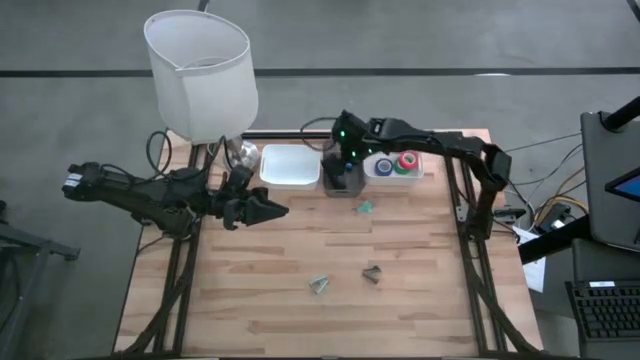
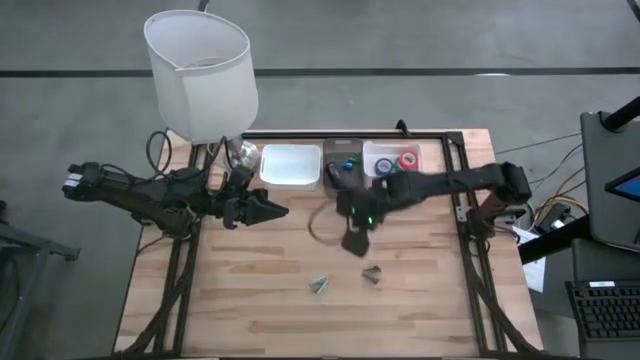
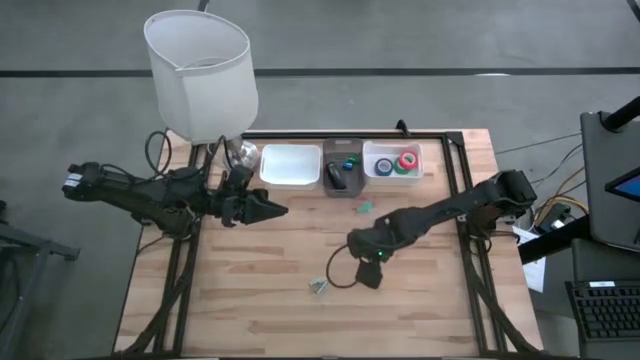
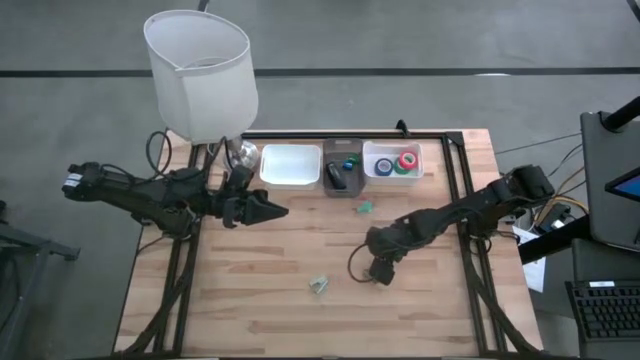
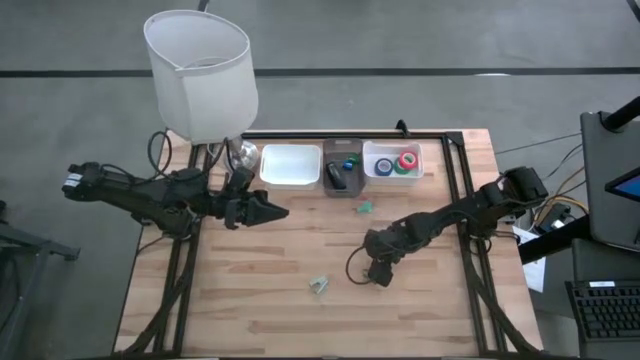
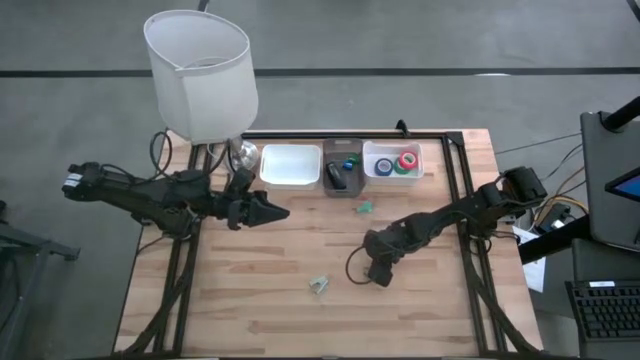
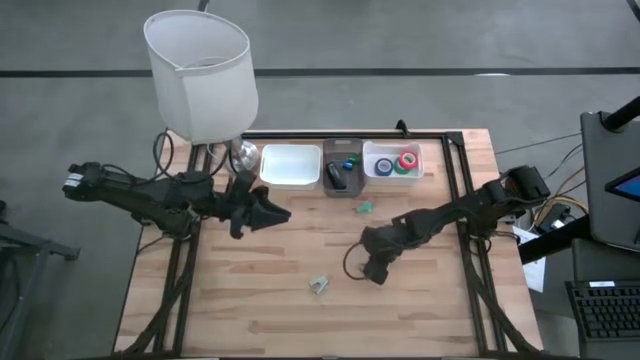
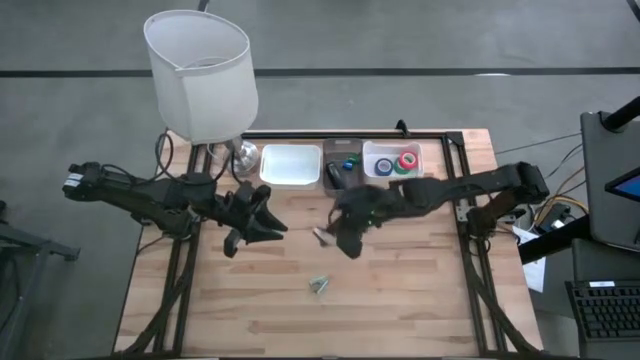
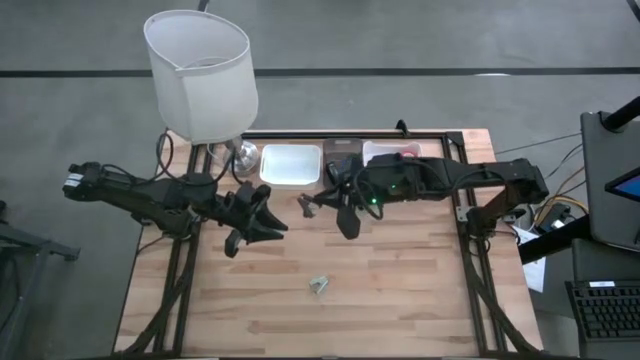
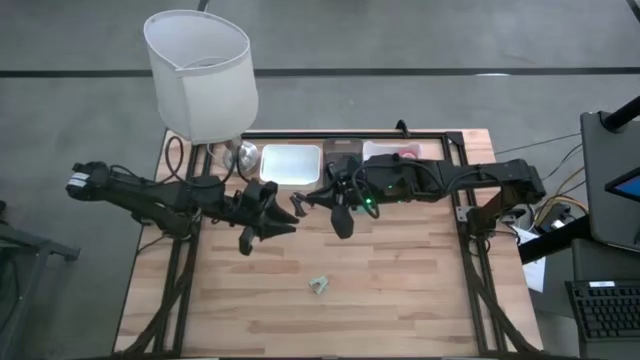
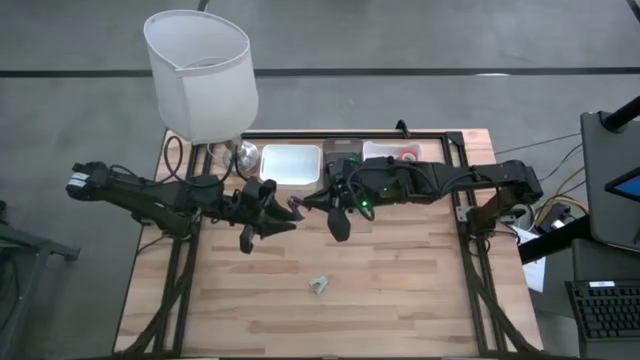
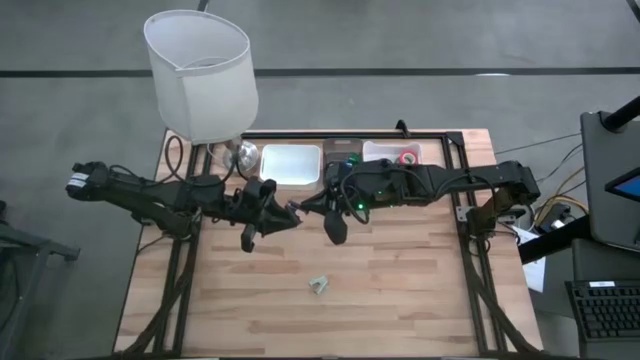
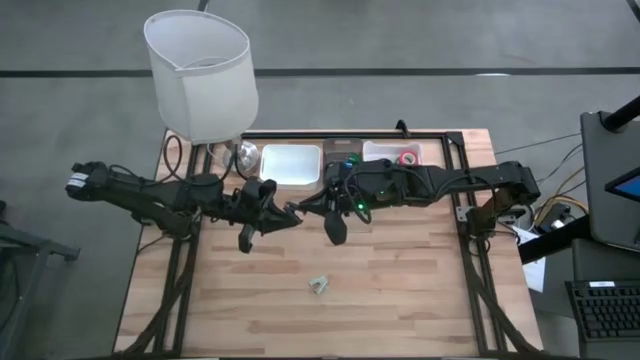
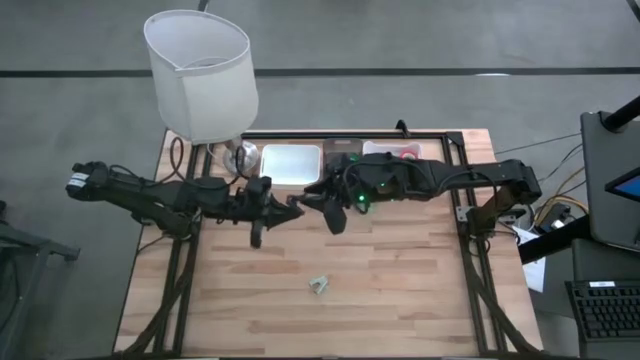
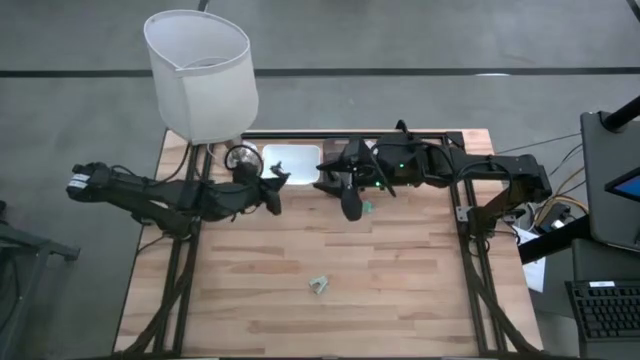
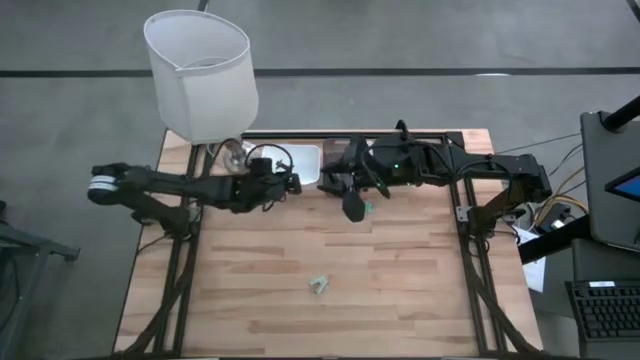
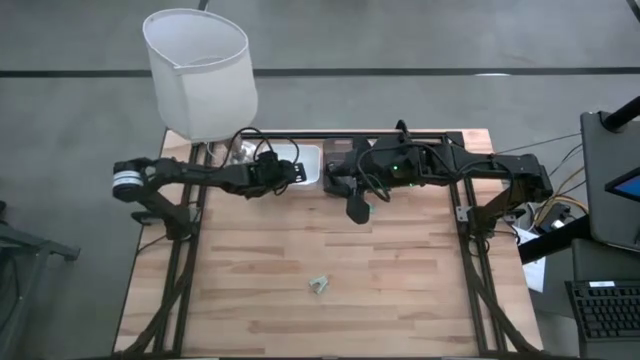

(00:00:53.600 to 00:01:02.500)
Task: Pick and place Stapler, Stapler remover, tape
Put the black staple remover into the left white bin

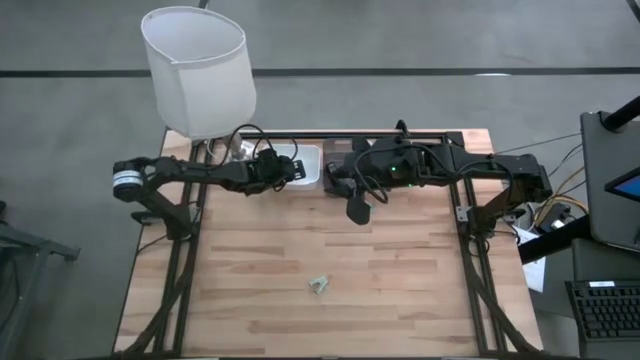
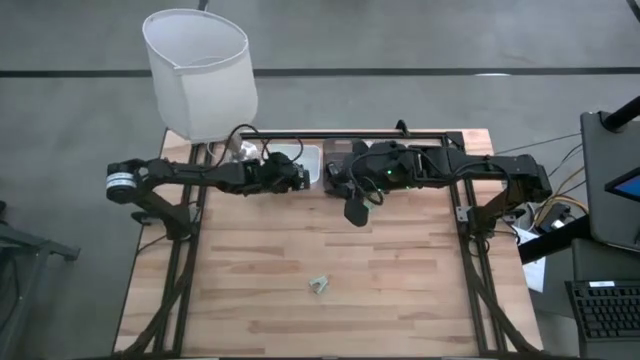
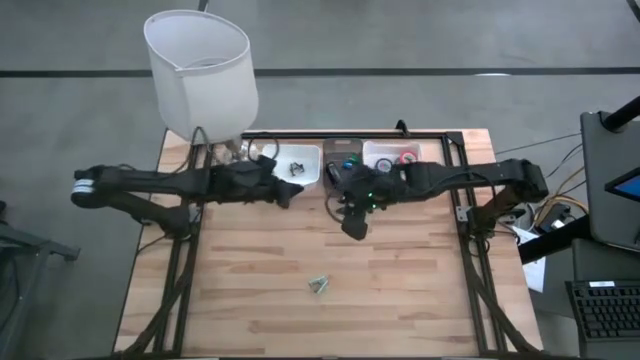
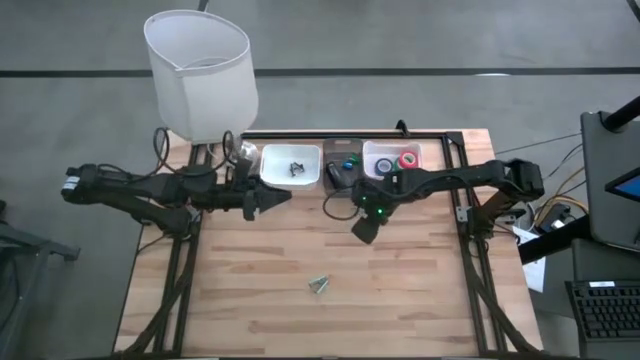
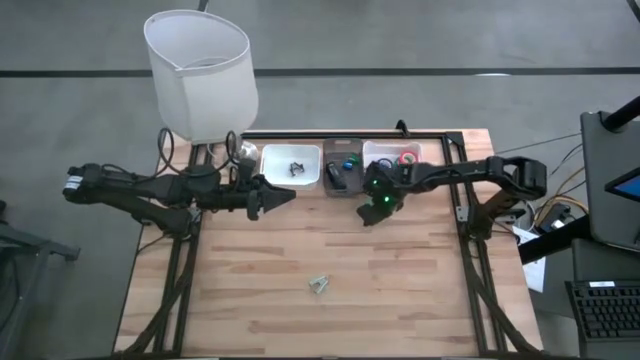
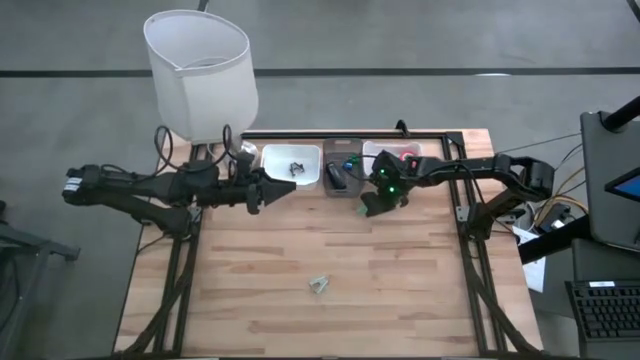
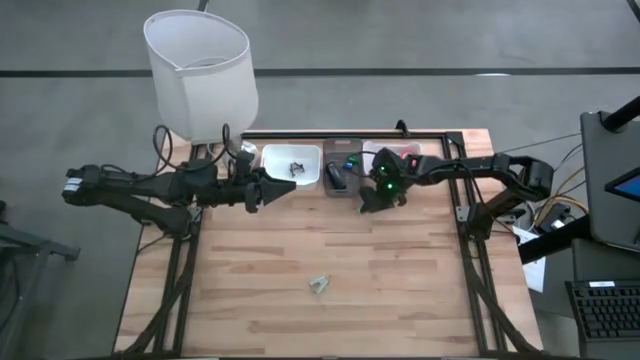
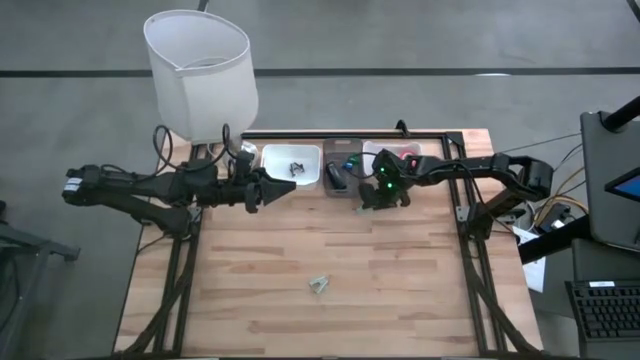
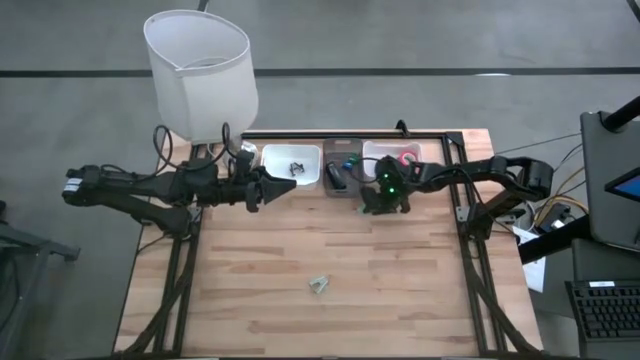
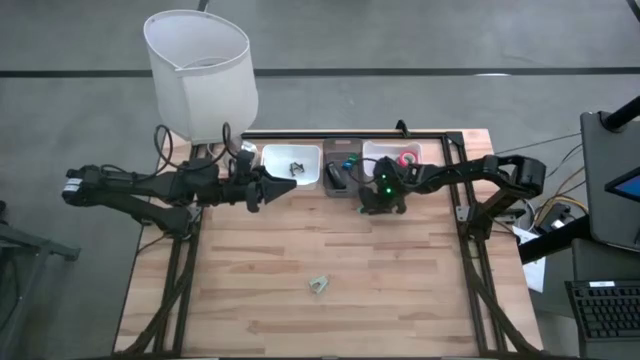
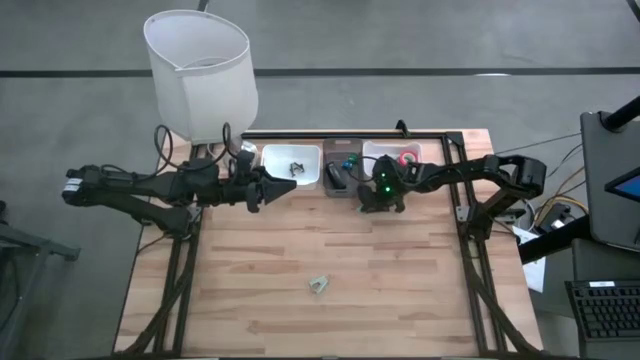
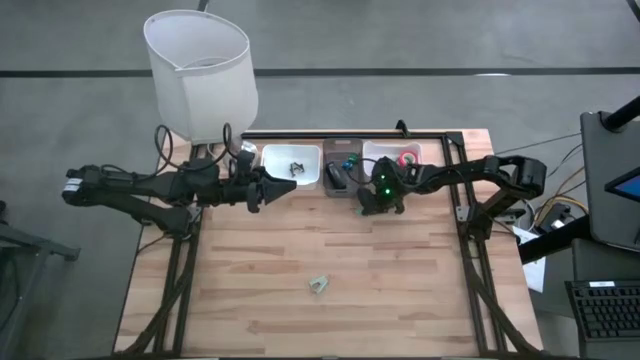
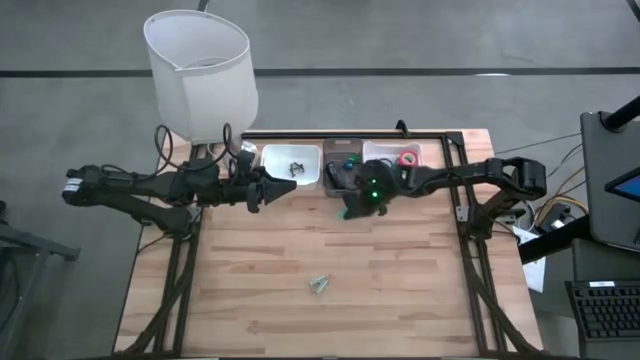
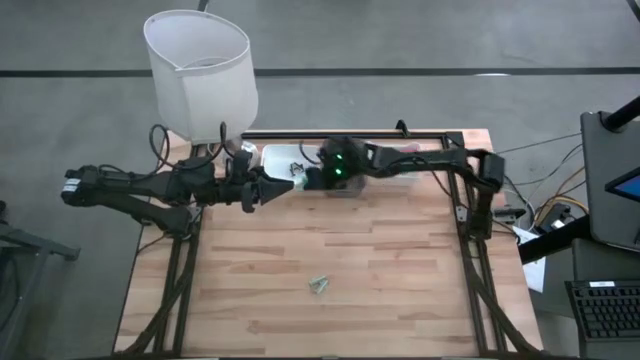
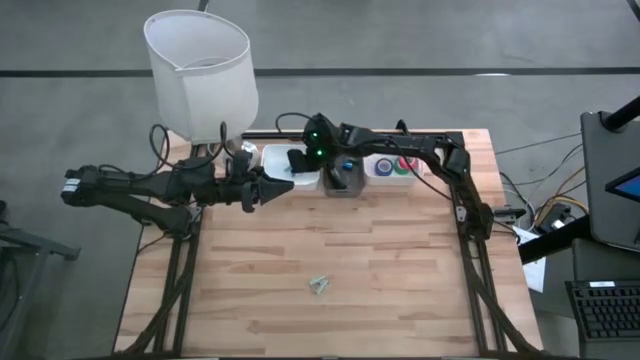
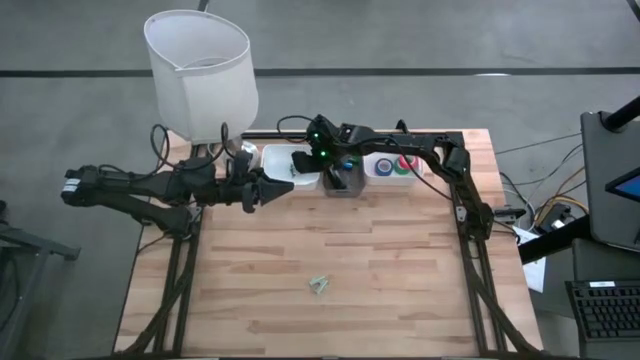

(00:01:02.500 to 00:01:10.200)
Put the top light blue staple remover into the left white bin

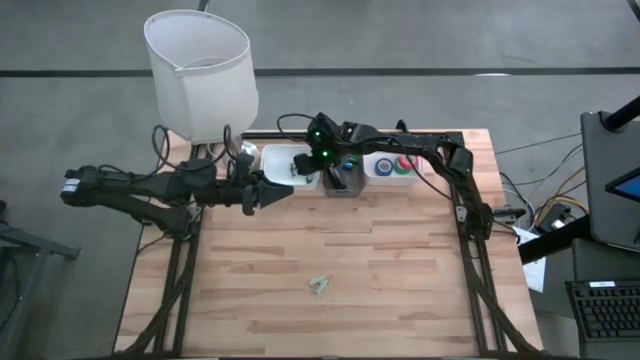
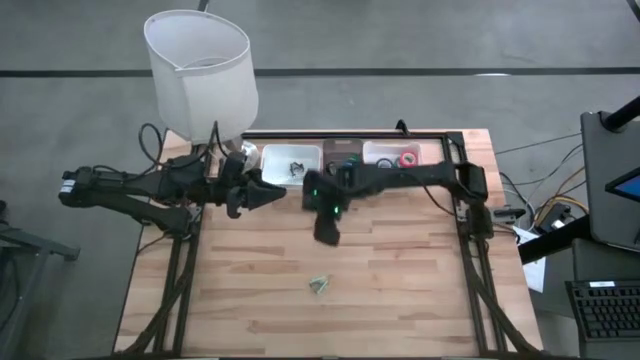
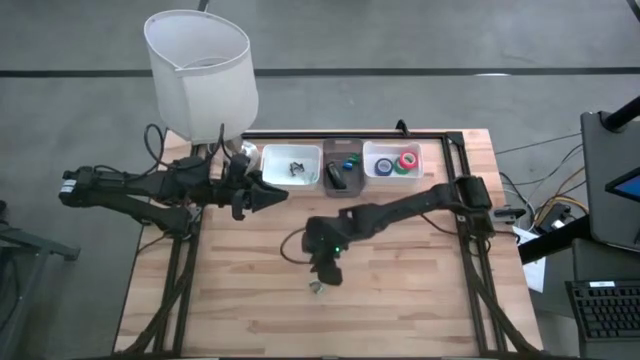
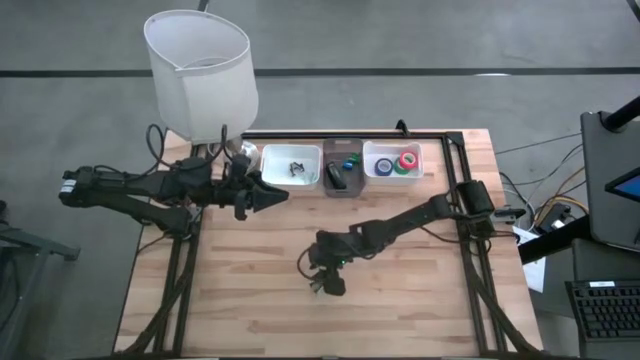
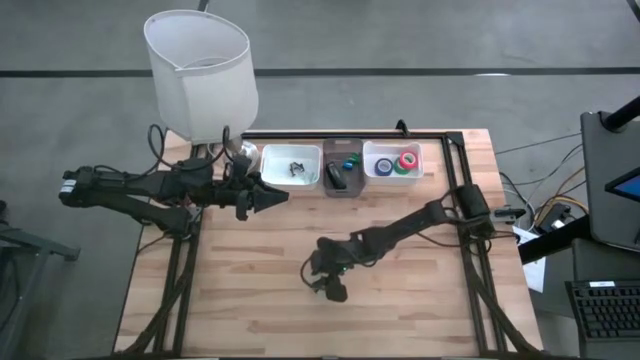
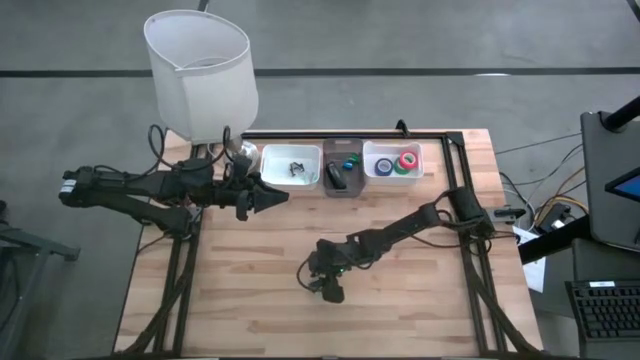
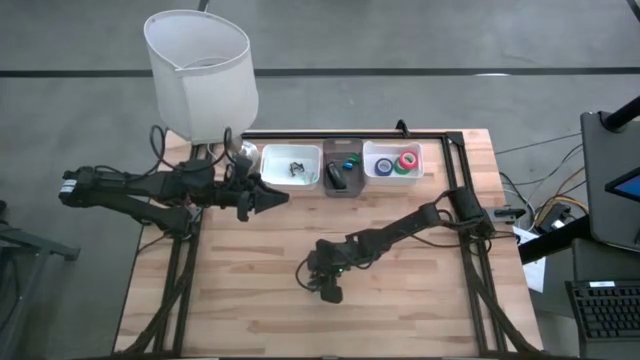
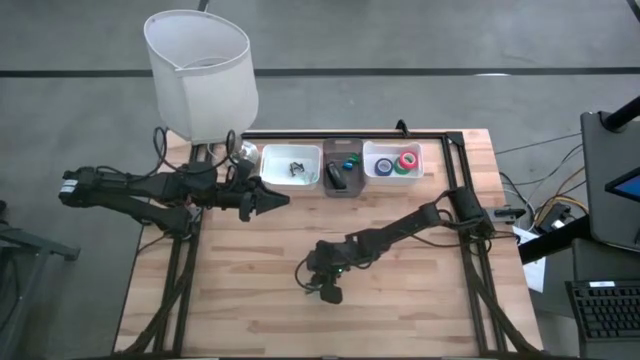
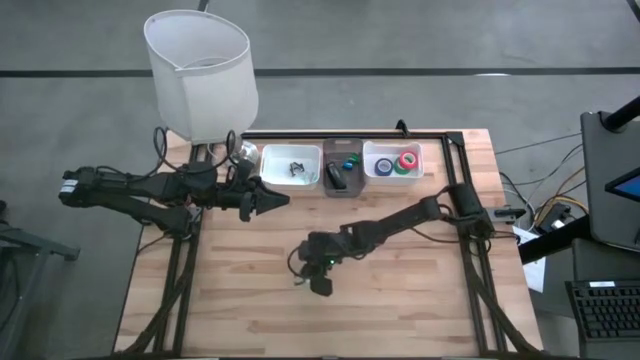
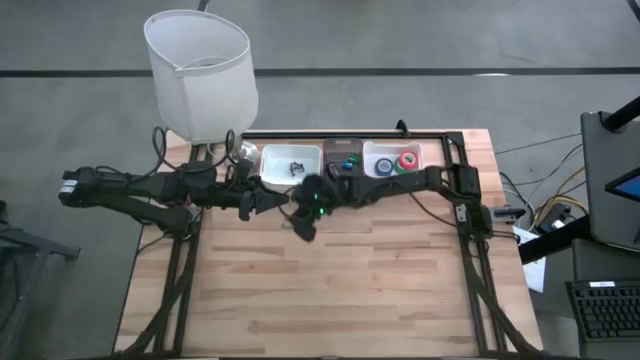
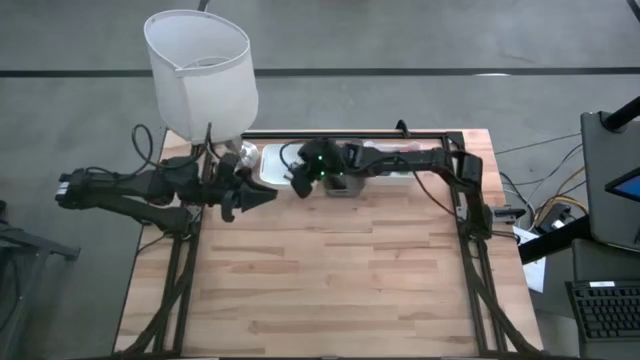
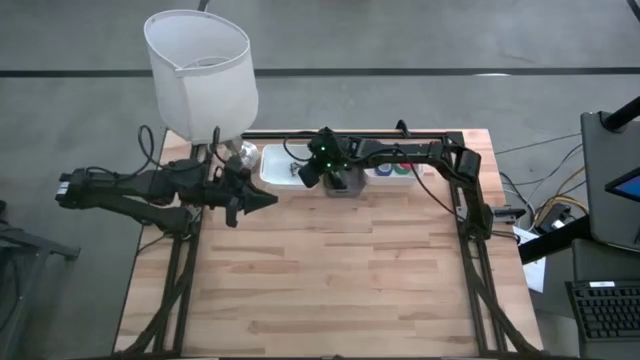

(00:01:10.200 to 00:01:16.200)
Put the light blue staple remover into the left white bin
